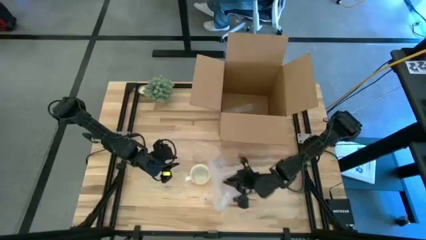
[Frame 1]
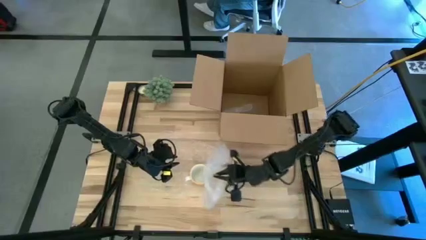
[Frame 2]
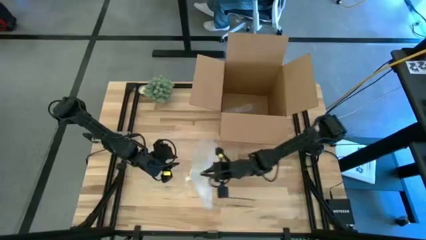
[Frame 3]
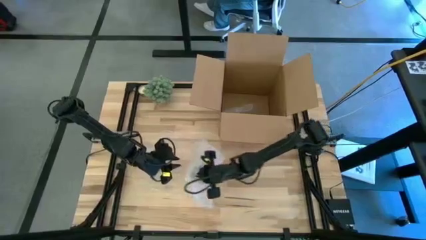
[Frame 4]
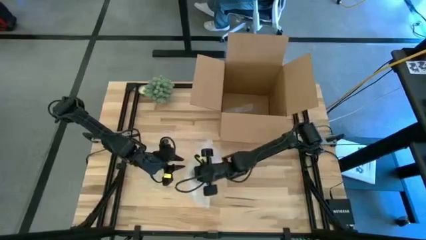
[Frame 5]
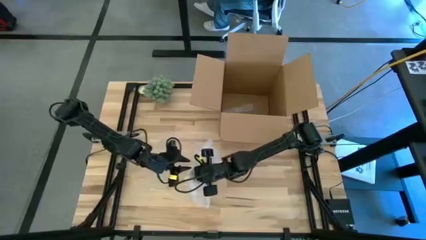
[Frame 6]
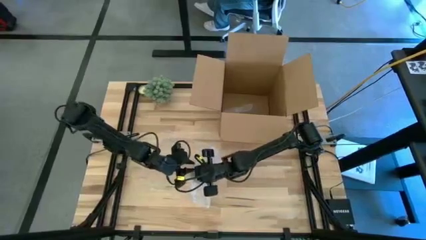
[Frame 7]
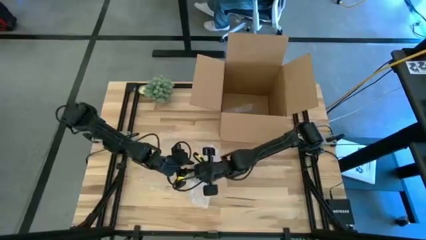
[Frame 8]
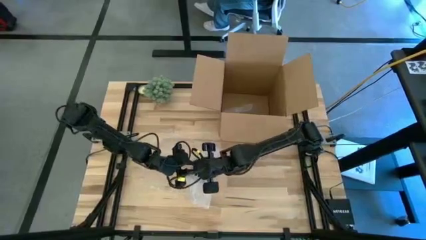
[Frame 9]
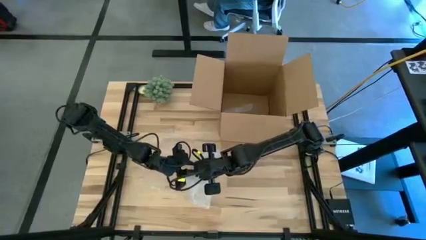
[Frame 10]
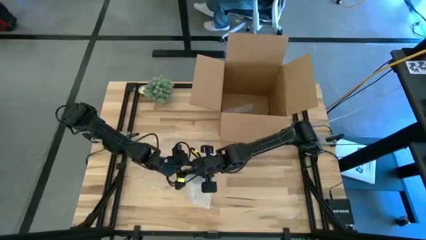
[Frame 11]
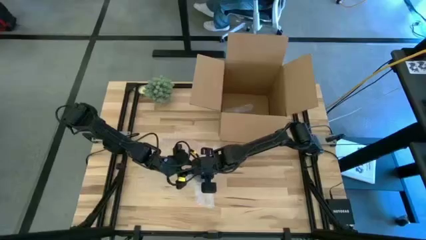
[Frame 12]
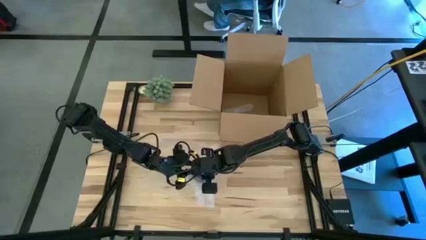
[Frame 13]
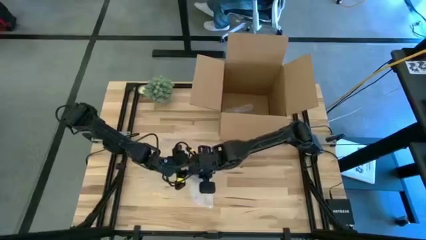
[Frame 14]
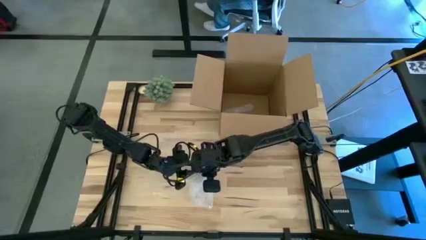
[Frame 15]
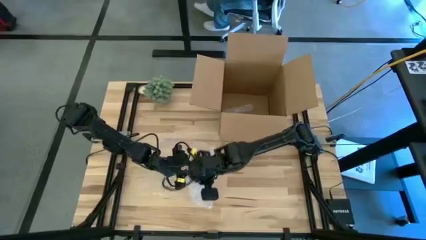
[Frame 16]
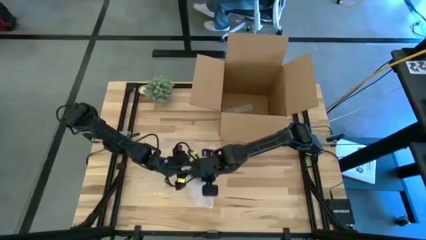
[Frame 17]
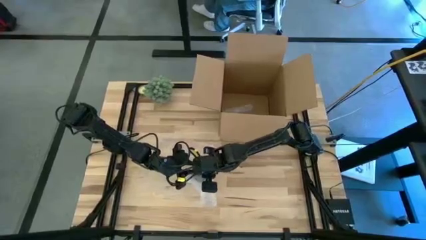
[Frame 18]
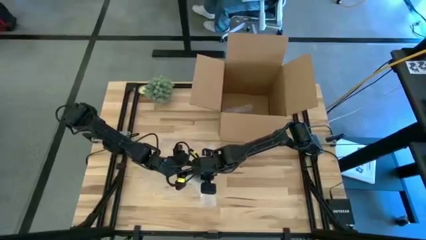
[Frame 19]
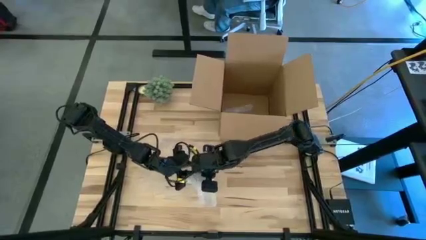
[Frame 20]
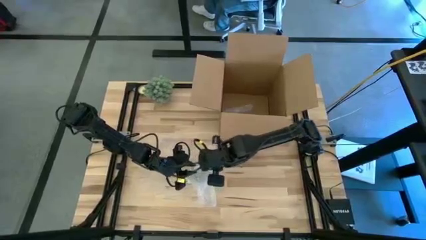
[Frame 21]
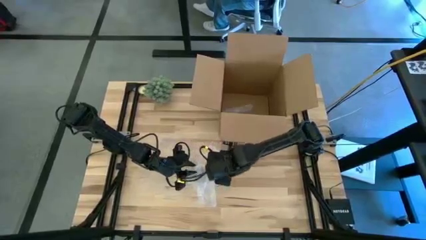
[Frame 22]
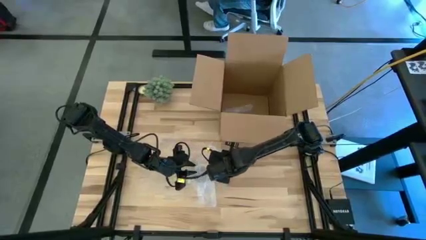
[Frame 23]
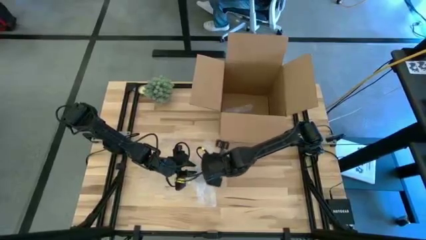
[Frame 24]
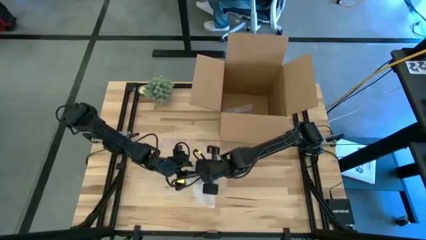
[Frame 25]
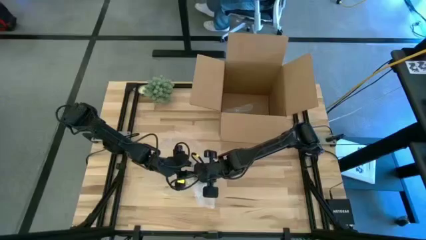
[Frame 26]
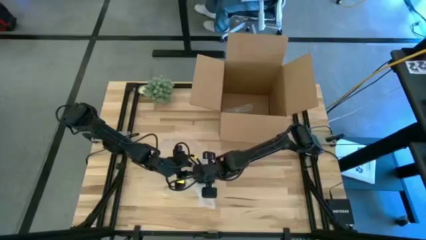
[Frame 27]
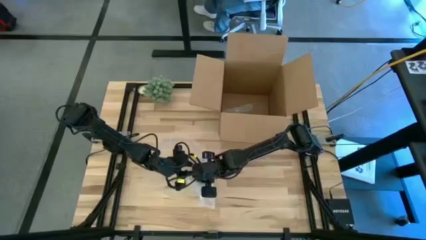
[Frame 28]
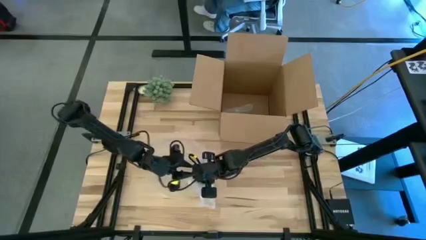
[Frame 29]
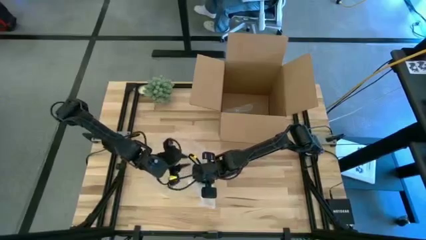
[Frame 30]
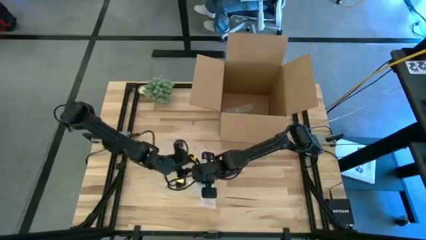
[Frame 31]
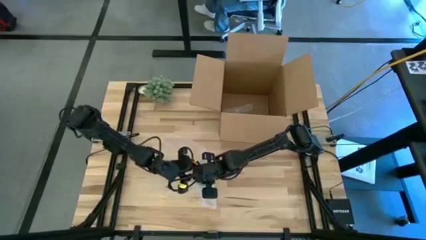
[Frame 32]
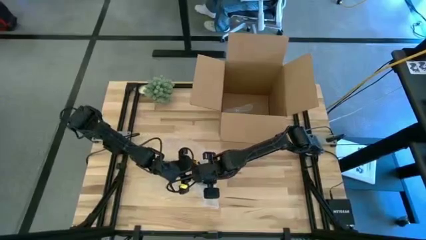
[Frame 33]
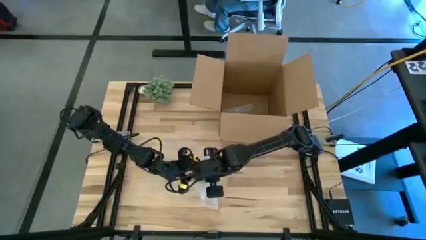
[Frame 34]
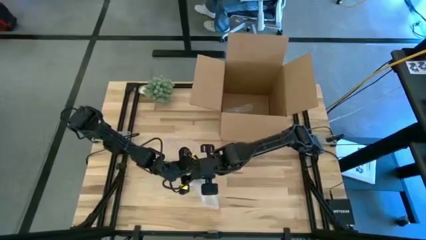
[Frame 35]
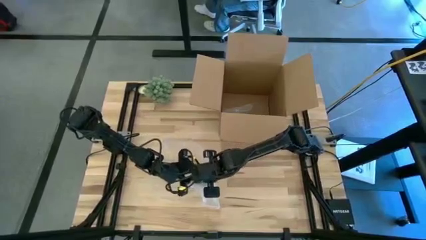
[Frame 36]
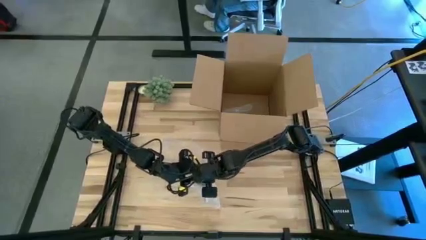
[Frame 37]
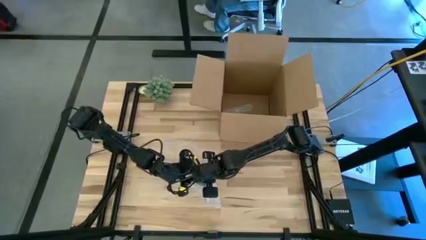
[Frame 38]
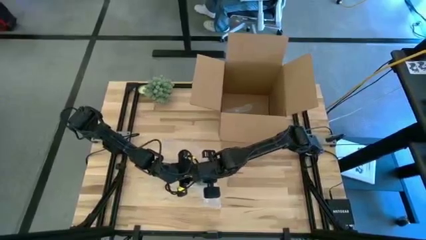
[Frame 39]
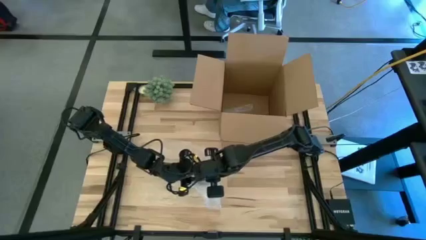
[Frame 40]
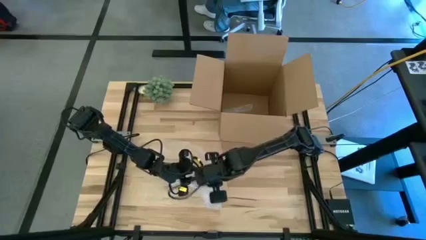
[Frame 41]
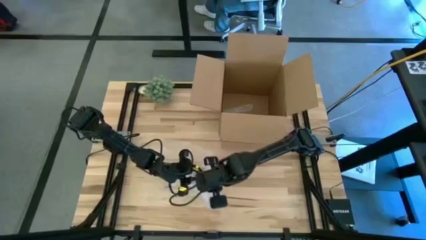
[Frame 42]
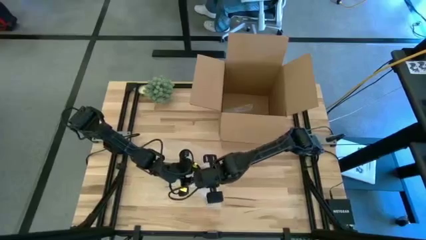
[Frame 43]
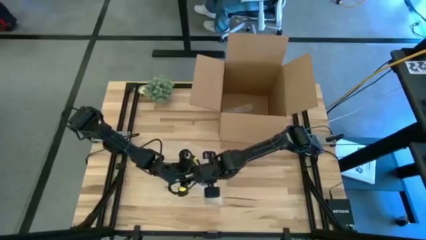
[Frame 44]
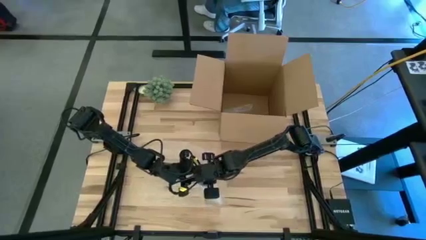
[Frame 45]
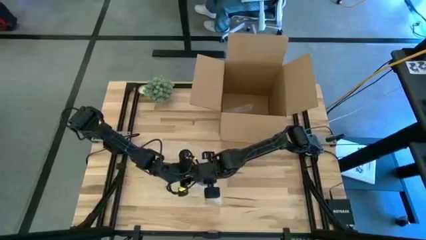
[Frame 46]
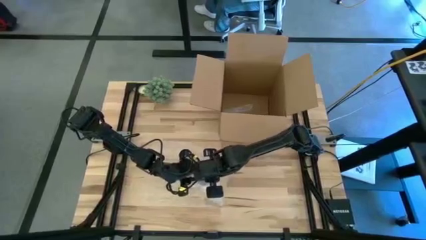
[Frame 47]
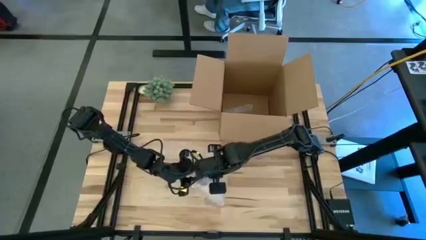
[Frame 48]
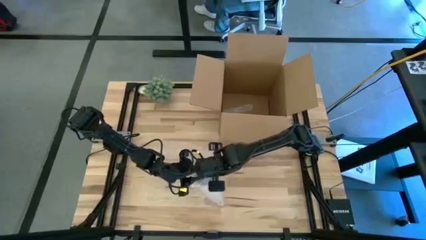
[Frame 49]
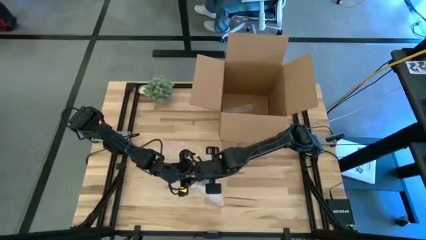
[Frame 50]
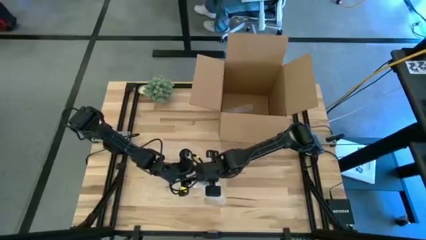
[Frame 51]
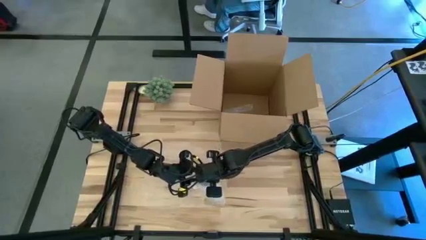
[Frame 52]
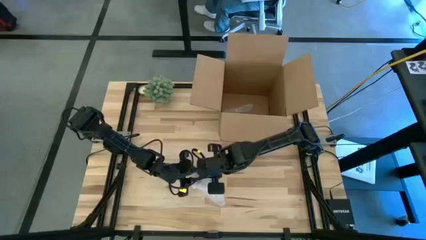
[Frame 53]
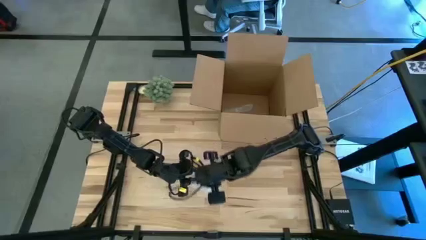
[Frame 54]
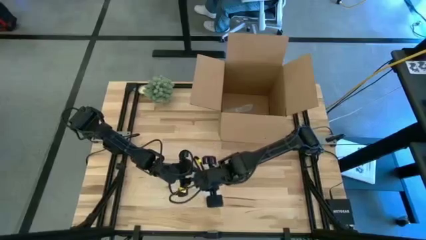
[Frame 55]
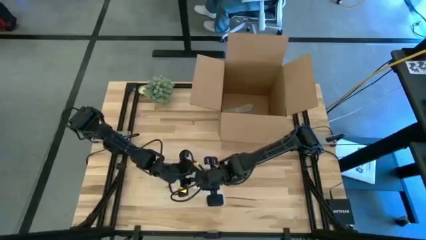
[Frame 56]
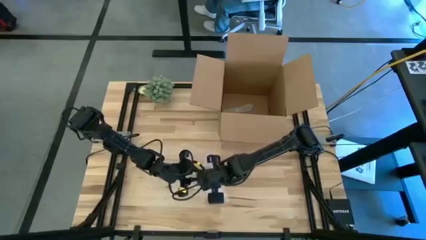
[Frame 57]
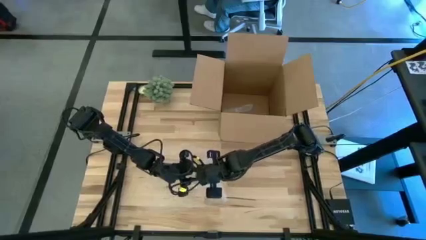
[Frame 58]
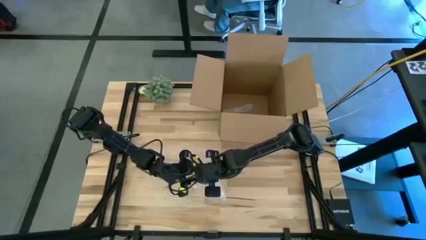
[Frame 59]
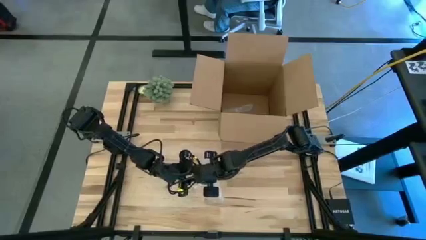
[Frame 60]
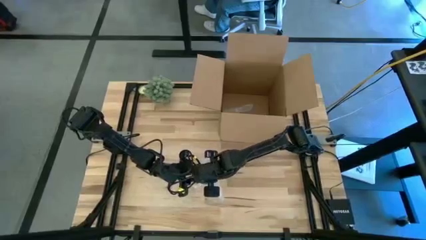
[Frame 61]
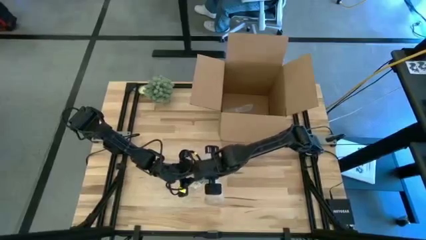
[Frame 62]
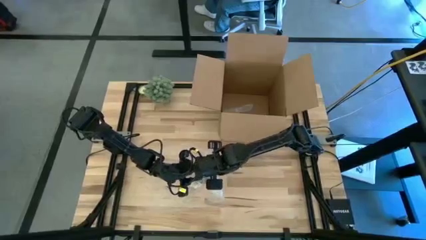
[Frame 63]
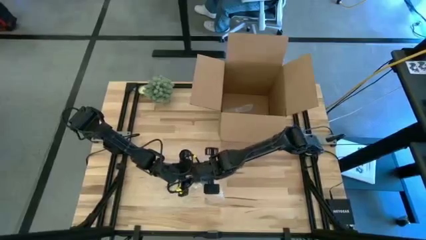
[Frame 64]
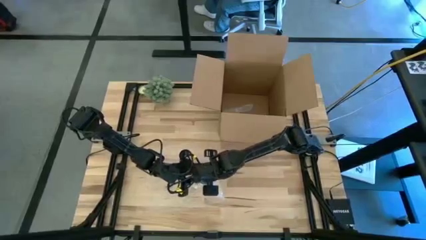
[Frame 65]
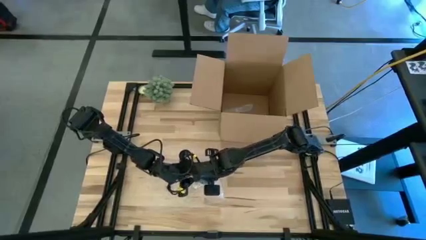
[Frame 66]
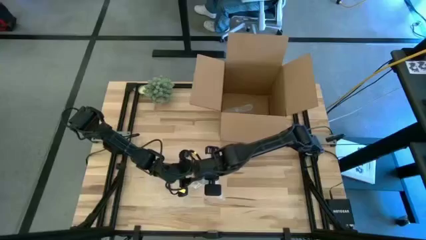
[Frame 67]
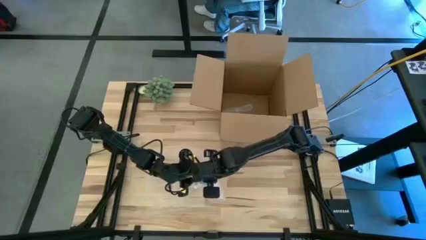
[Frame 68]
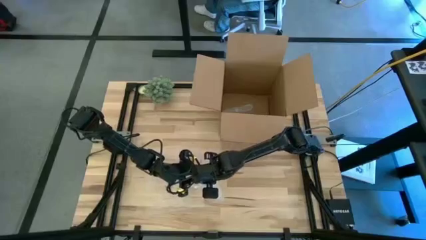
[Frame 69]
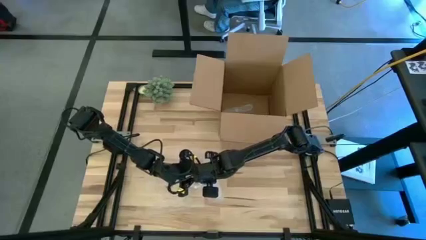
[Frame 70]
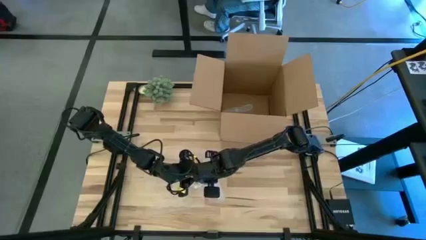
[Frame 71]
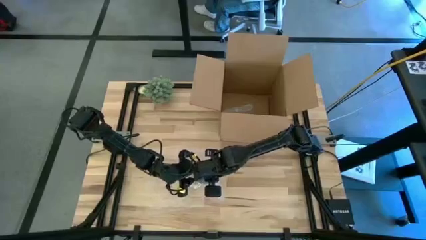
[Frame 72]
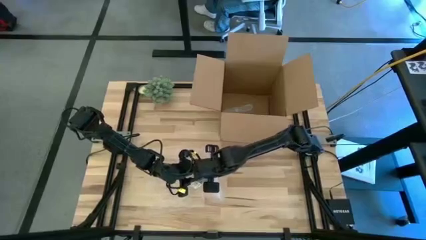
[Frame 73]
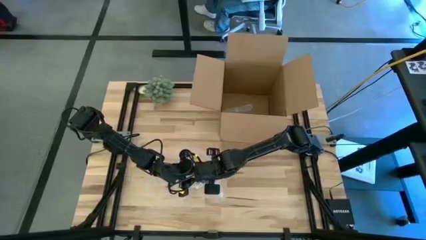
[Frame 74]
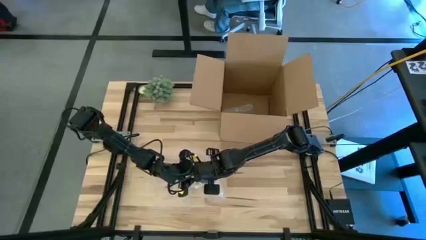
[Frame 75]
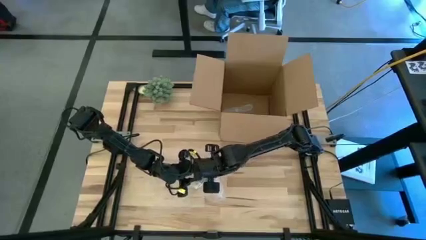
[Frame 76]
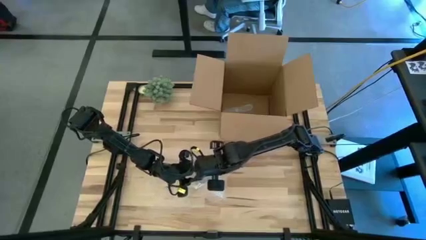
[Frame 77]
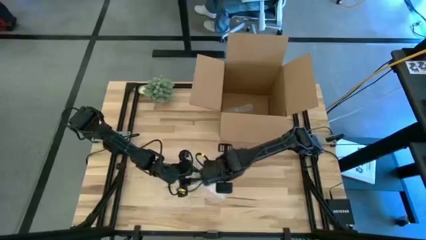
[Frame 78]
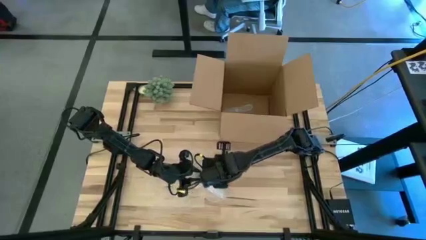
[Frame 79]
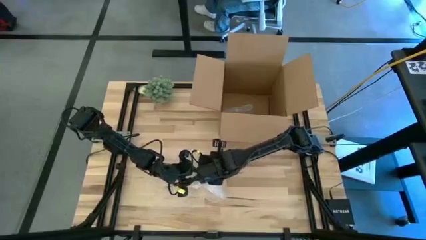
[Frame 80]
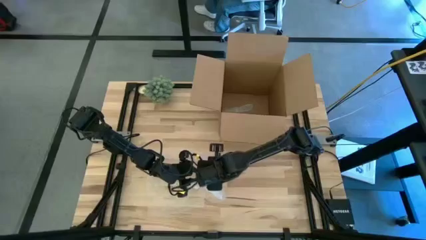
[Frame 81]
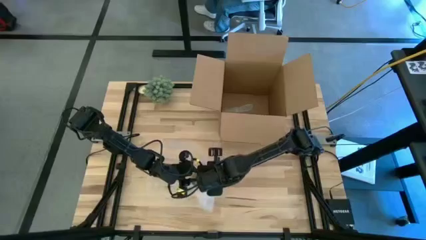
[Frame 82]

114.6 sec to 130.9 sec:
Task: wrap mug
Wrap the orange patterned mug with the bubble wrap
